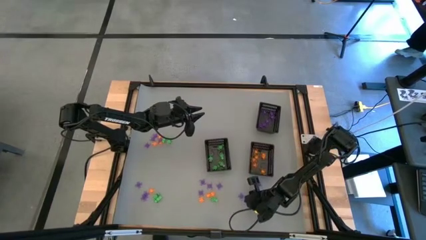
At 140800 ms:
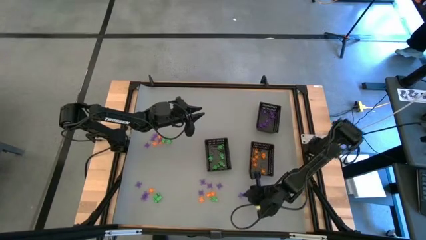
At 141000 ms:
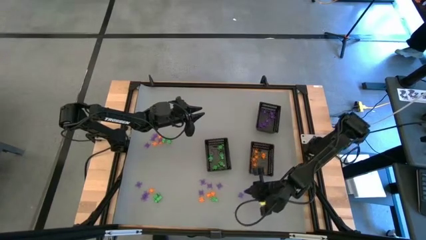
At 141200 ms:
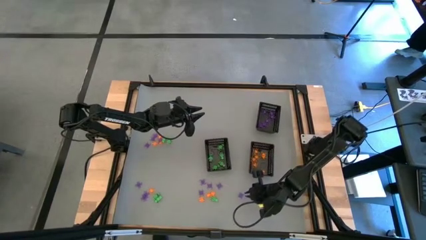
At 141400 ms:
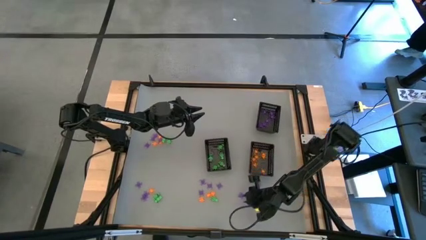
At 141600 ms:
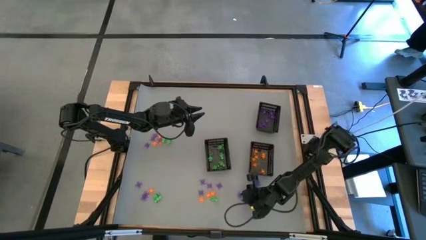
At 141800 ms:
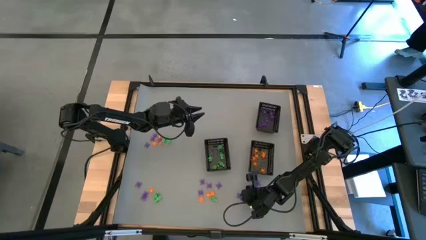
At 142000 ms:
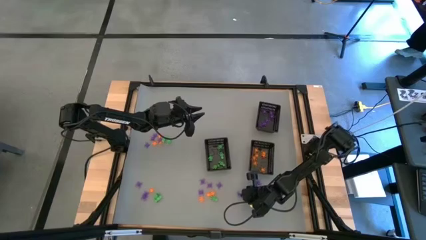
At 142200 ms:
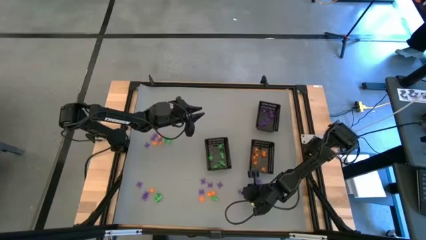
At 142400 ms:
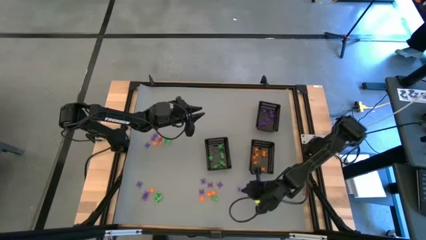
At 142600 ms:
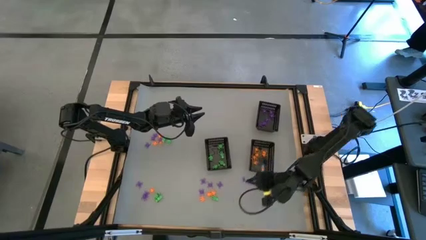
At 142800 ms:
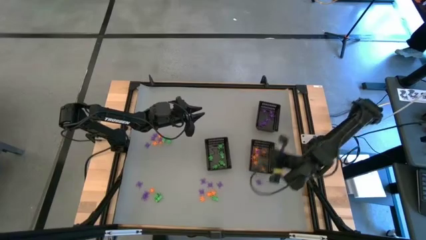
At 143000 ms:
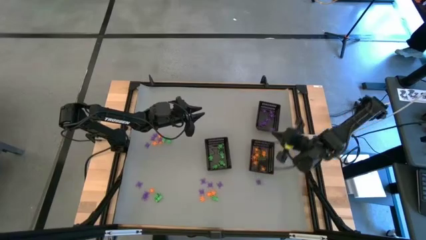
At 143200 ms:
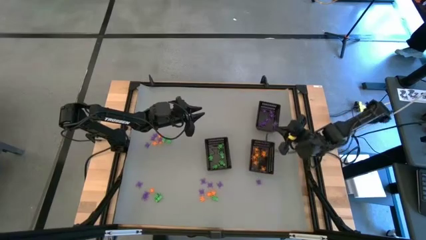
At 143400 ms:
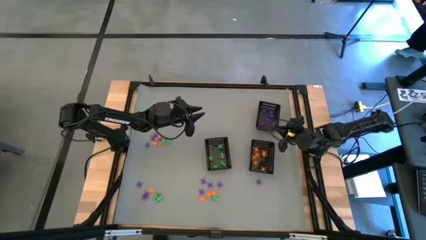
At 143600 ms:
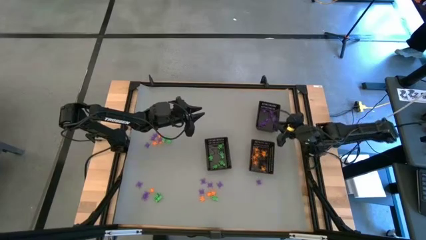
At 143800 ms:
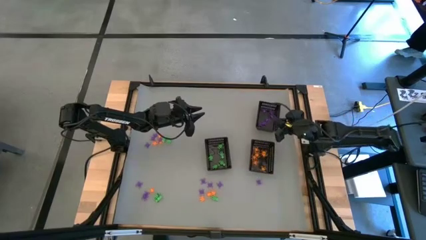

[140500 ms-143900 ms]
Task: Sort Halloween decoration
Put the purple spider toy into the top bin

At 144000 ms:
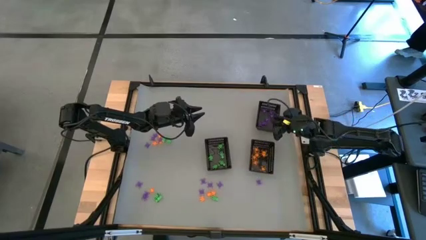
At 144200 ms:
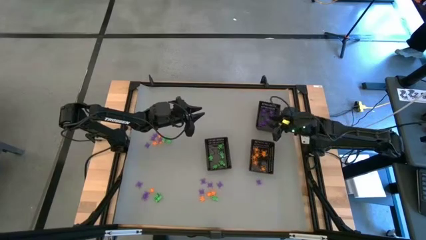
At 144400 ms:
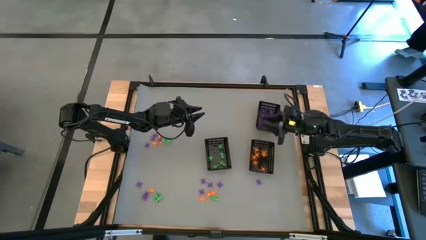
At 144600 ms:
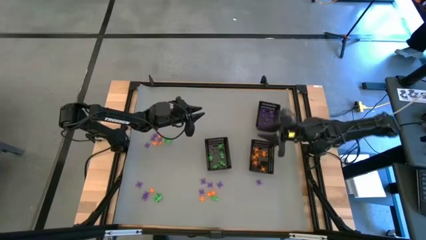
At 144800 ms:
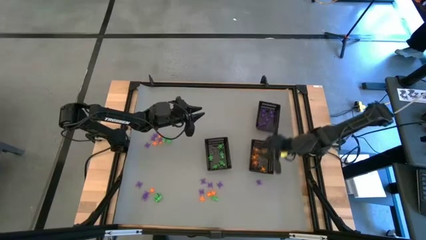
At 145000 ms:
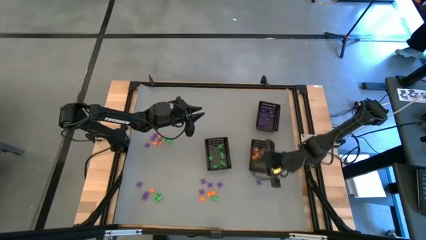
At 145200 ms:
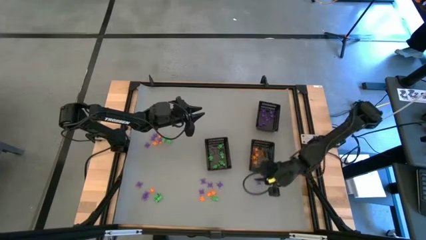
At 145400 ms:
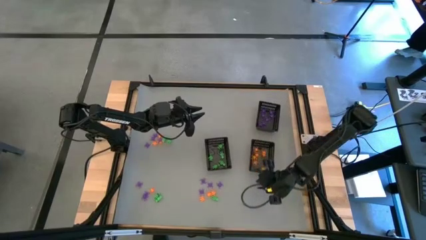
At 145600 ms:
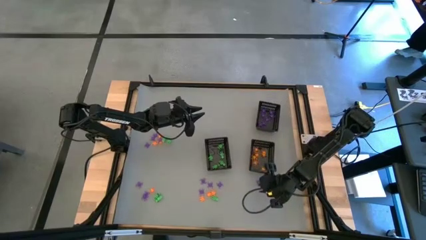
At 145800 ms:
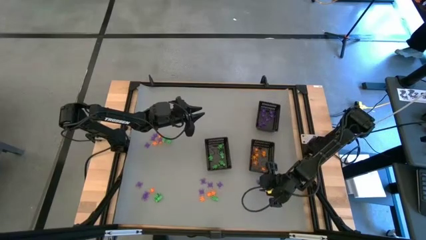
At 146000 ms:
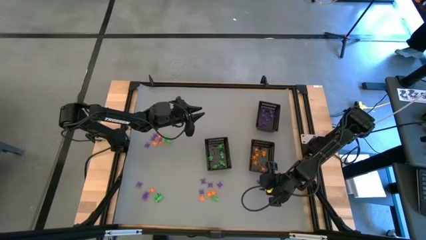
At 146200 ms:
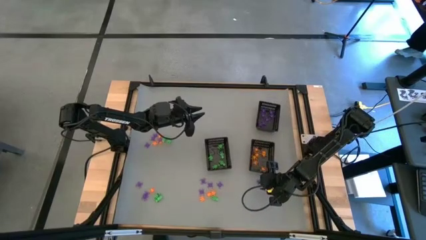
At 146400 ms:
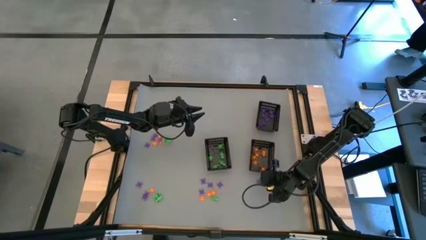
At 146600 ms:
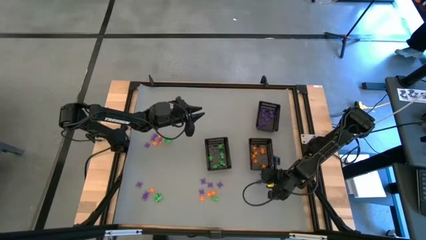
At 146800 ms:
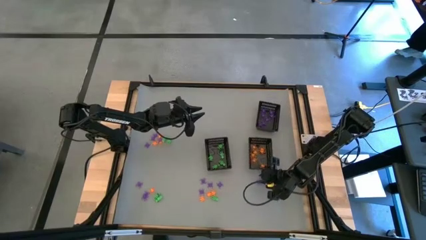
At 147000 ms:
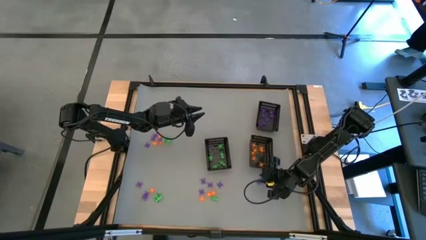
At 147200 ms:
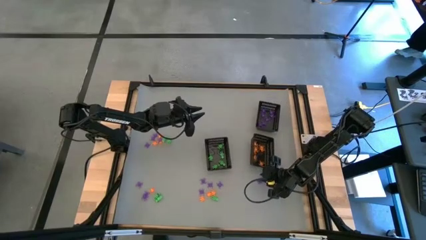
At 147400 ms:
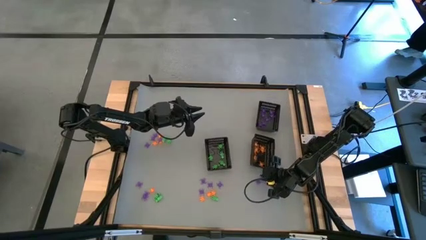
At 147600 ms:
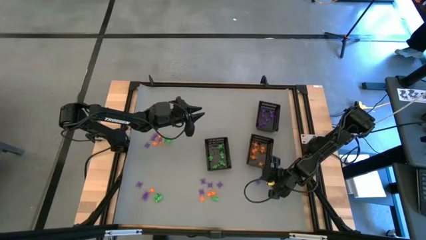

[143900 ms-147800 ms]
Put the purple spider toy into the top bin

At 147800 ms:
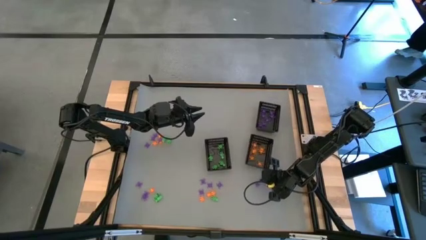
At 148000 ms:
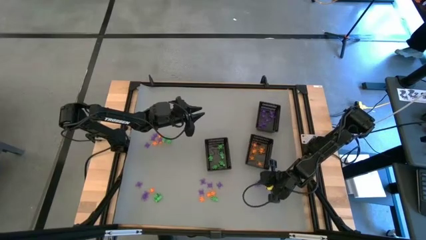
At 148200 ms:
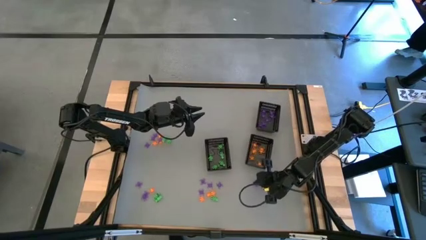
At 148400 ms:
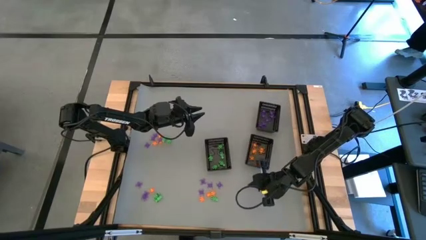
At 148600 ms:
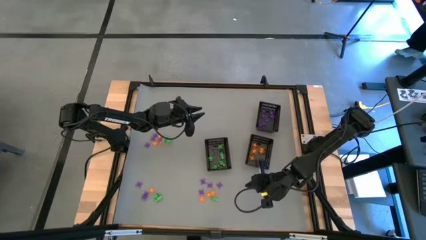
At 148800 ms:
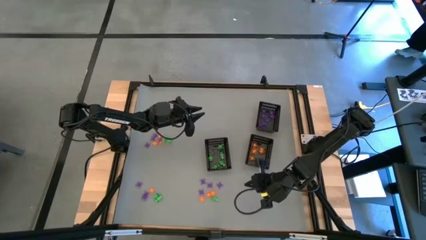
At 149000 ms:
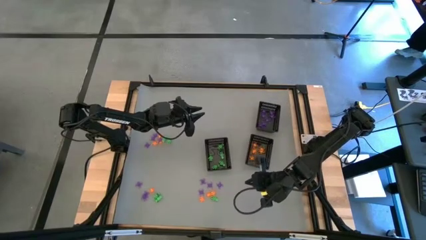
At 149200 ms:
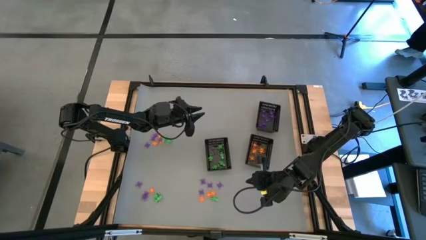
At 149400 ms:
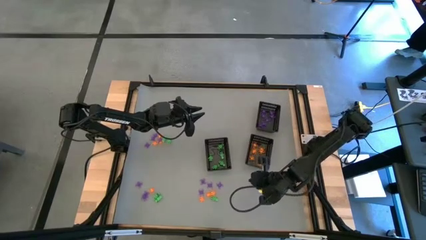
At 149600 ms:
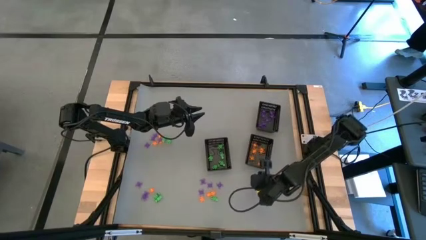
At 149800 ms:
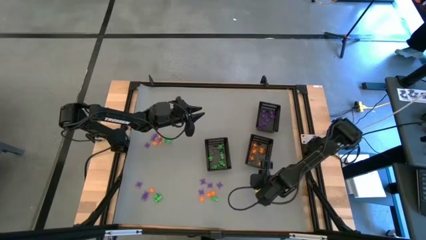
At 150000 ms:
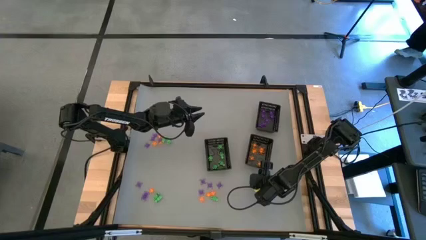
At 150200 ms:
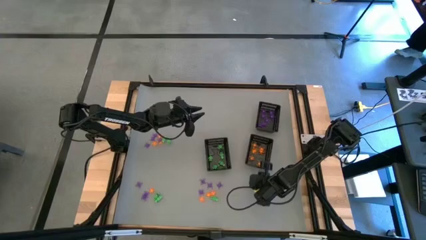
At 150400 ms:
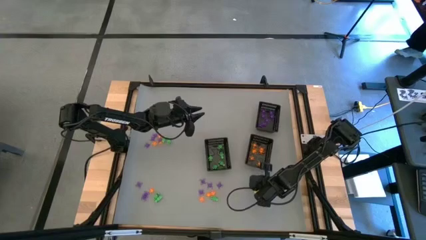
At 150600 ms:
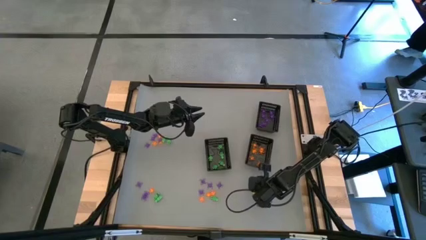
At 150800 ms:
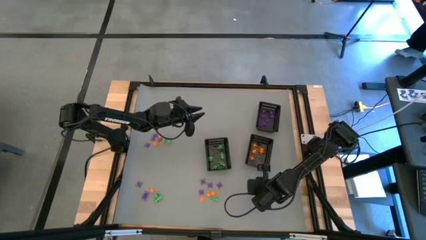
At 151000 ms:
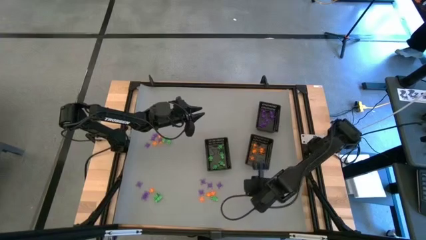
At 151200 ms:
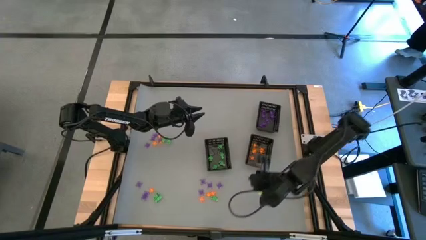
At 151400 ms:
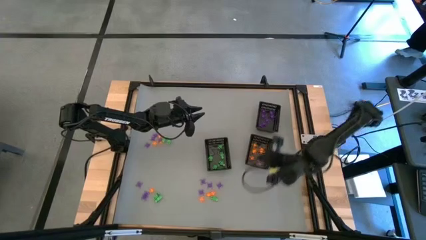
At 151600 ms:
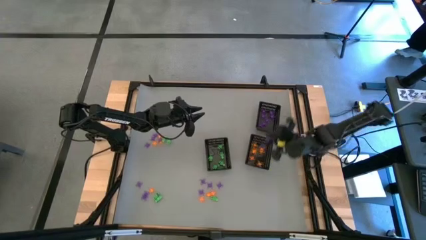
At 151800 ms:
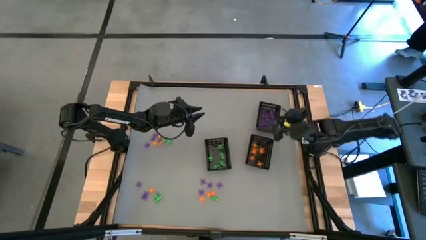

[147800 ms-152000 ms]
Put the purple spider toy into the top bin

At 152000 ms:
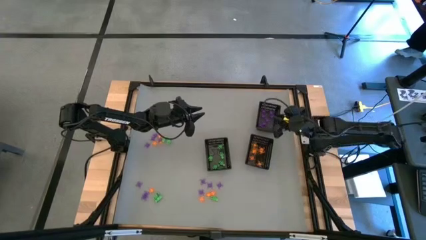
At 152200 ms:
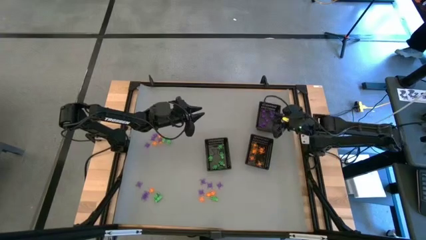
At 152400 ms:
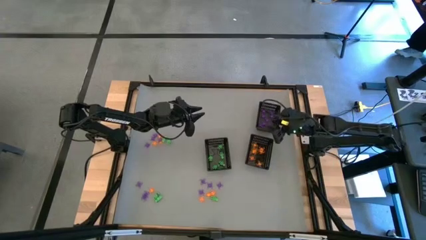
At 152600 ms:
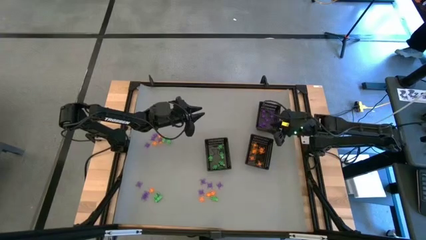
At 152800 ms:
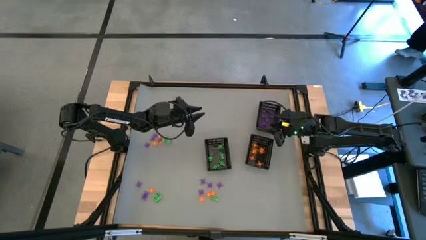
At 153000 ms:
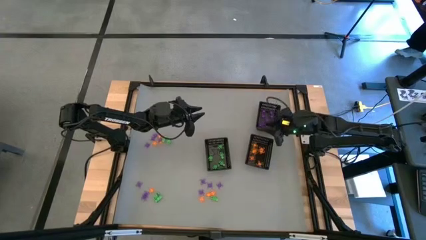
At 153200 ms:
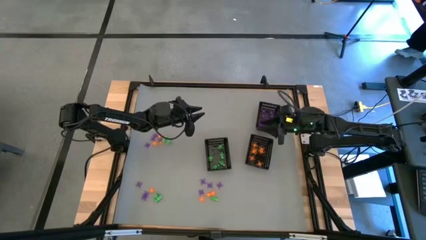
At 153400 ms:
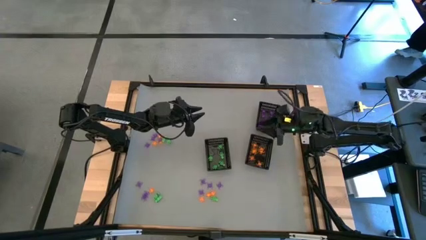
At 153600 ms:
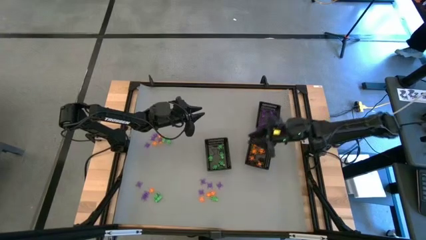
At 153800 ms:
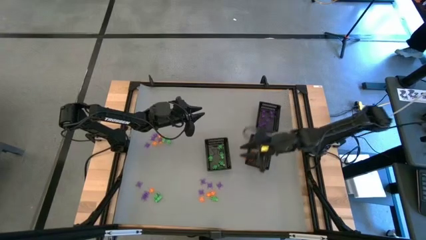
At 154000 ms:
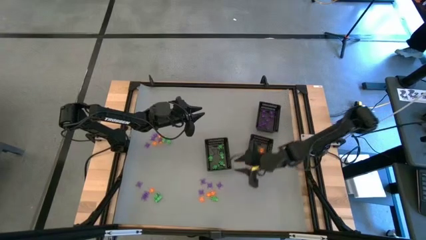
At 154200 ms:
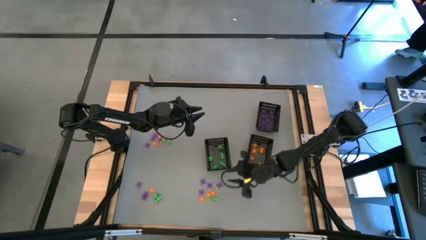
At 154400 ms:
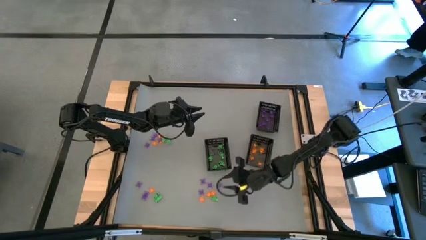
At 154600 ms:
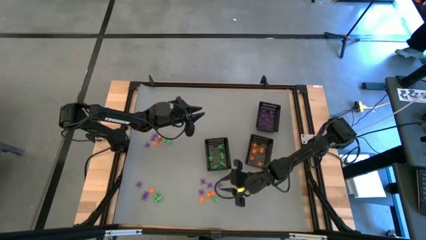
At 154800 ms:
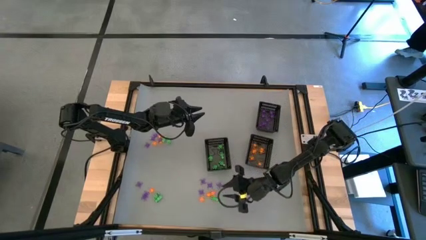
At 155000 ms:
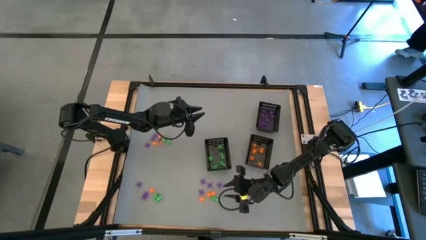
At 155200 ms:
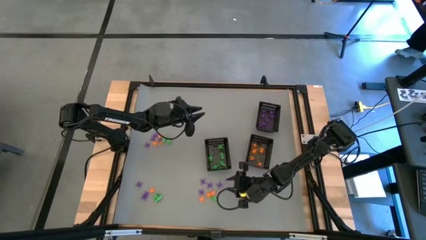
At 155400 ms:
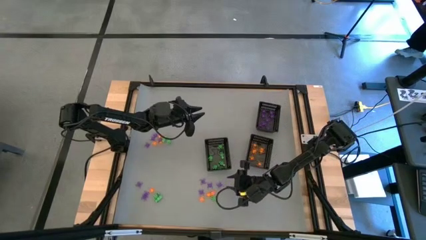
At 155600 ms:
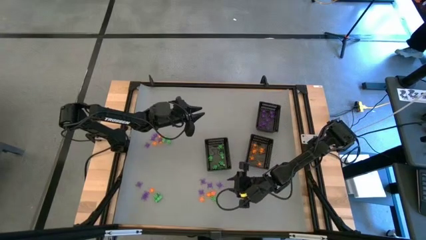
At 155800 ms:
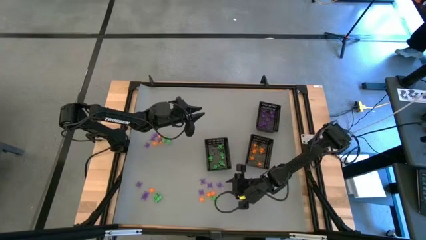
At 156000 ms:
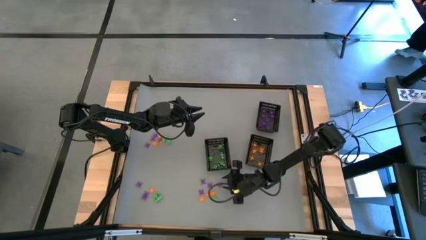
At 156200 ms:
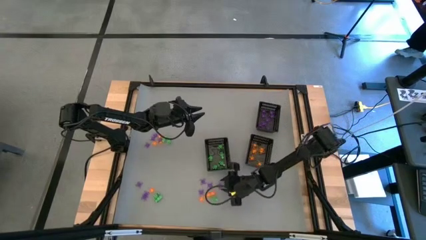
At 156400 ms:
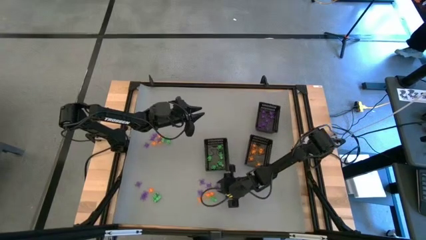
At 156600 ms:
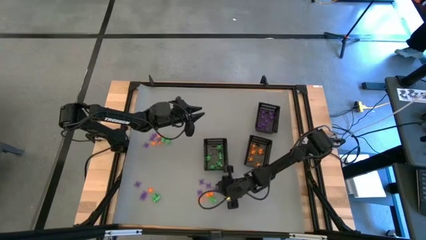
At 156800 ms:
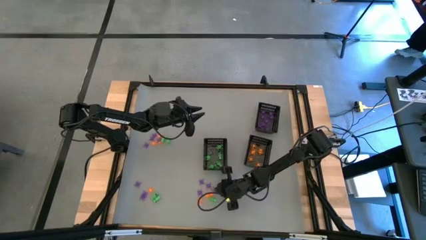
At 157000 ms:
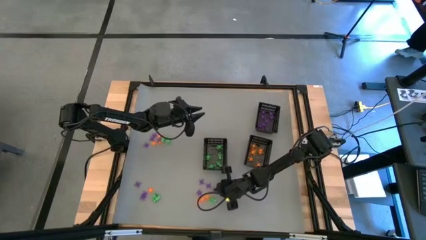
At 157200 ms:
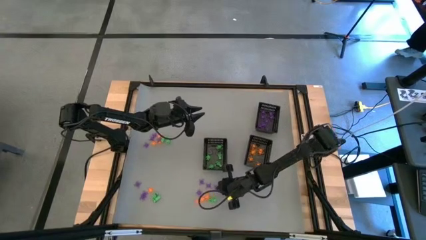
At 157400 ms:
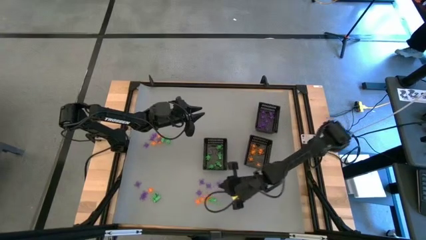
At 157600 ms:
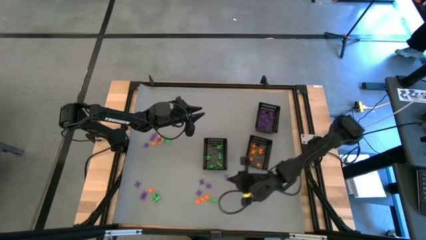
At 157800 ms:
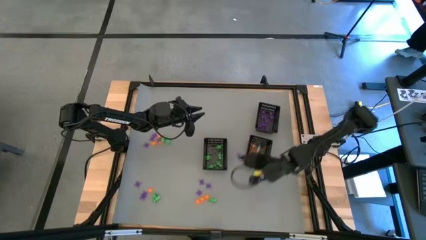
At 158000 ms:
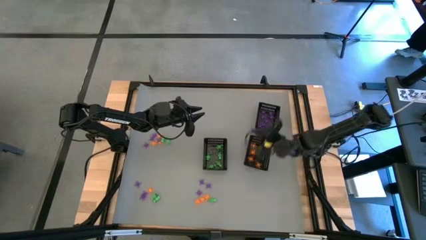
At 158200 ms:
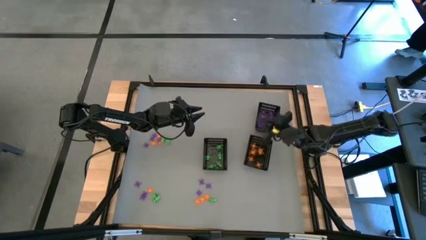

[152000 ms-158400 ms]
Put the purple spider toy into the top bin
